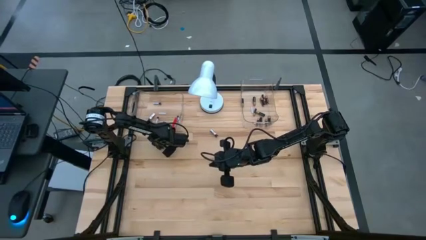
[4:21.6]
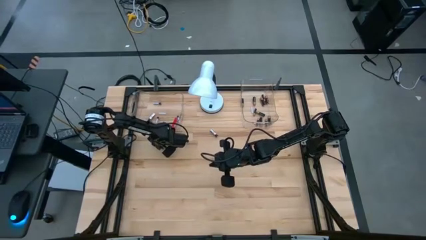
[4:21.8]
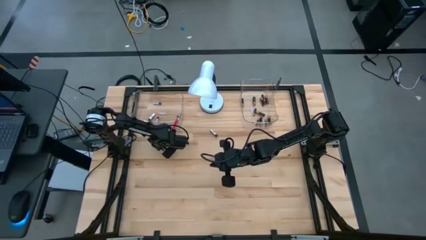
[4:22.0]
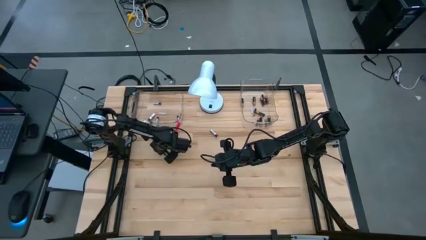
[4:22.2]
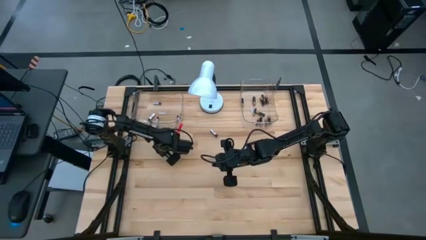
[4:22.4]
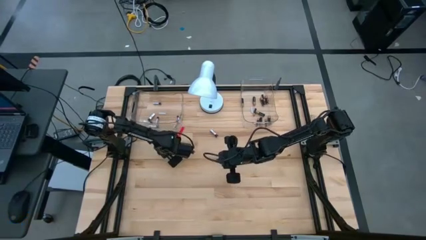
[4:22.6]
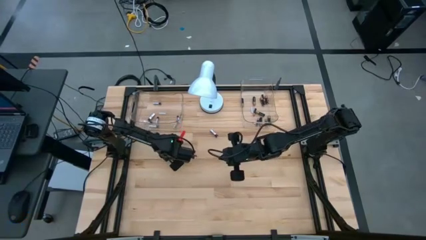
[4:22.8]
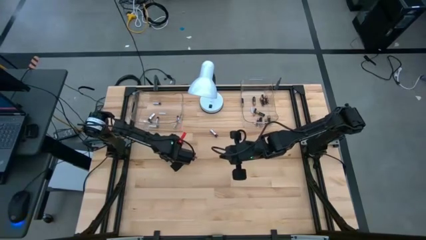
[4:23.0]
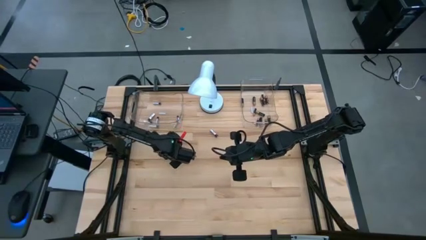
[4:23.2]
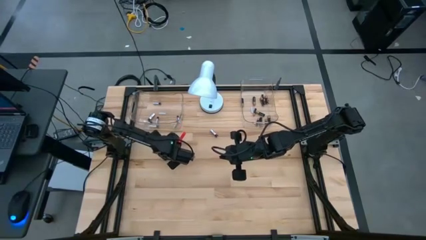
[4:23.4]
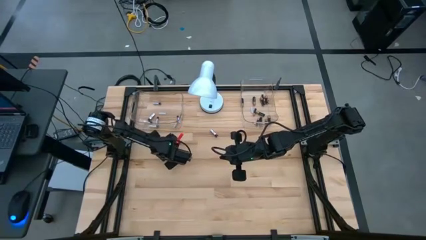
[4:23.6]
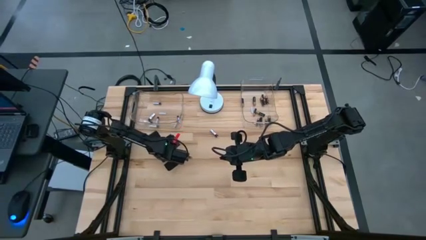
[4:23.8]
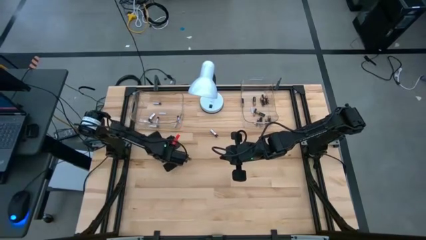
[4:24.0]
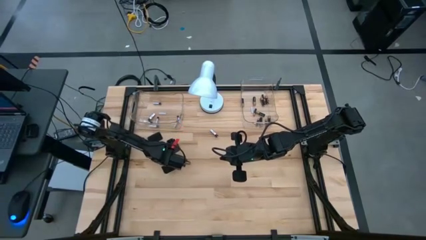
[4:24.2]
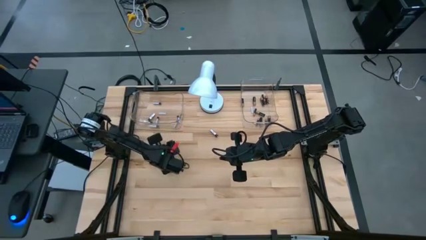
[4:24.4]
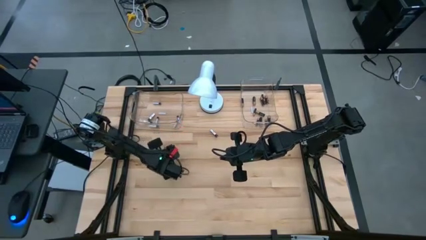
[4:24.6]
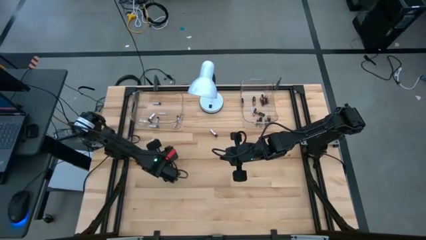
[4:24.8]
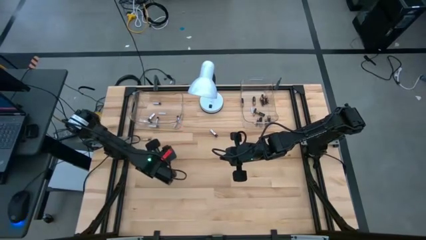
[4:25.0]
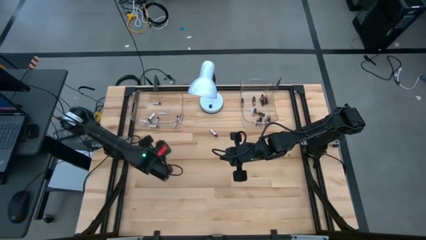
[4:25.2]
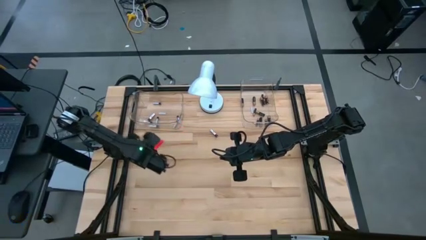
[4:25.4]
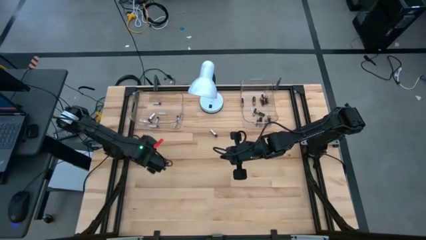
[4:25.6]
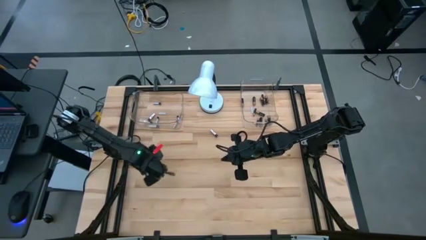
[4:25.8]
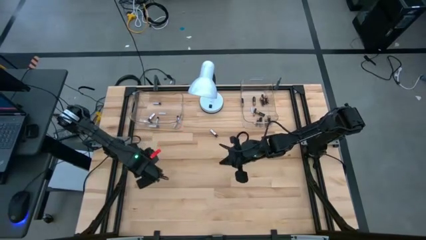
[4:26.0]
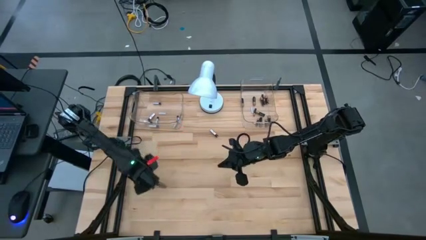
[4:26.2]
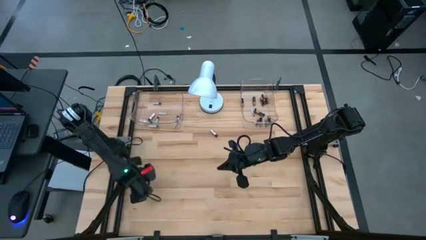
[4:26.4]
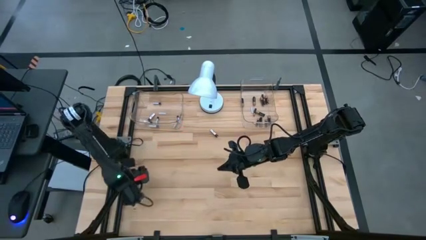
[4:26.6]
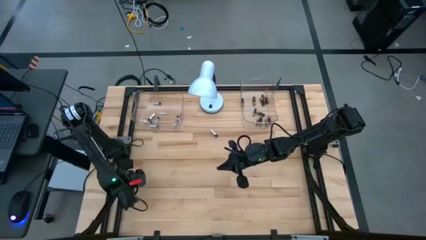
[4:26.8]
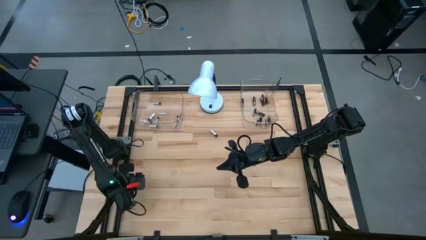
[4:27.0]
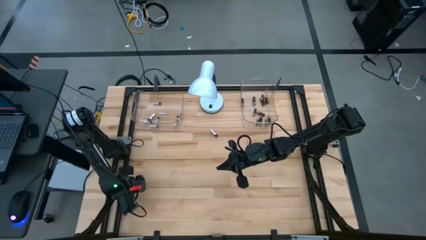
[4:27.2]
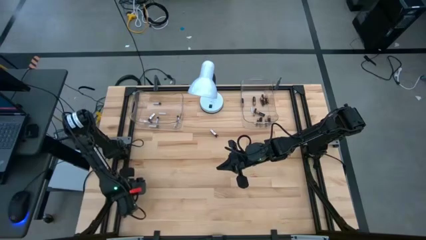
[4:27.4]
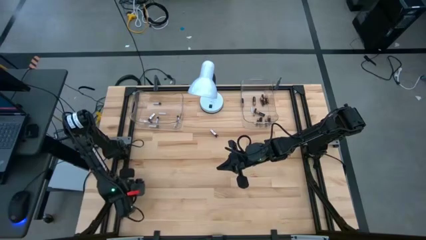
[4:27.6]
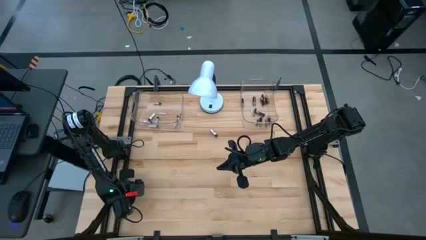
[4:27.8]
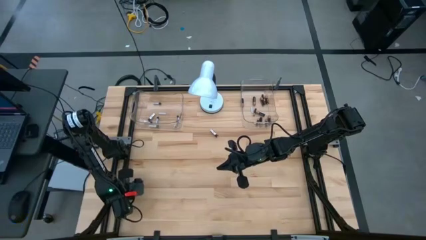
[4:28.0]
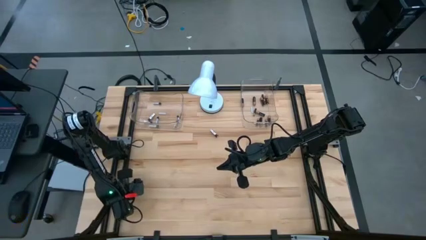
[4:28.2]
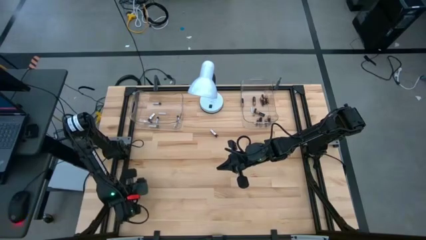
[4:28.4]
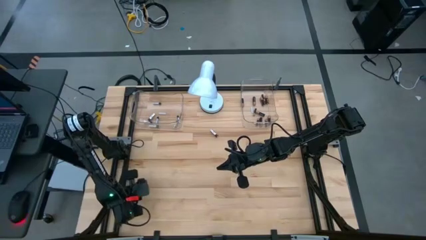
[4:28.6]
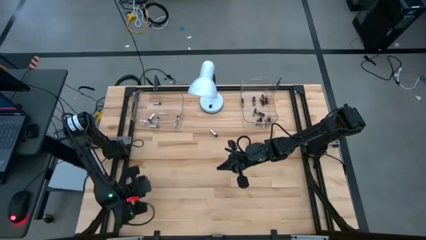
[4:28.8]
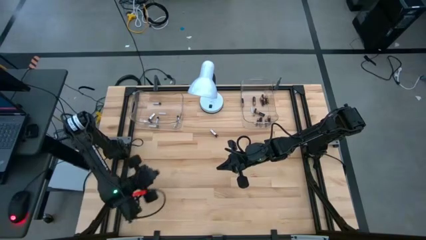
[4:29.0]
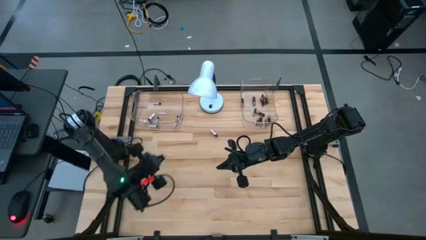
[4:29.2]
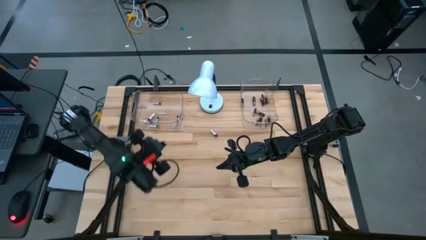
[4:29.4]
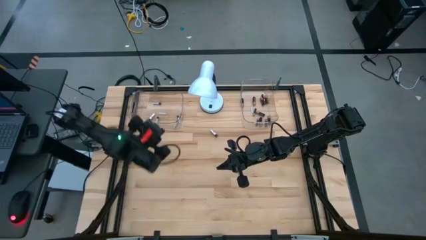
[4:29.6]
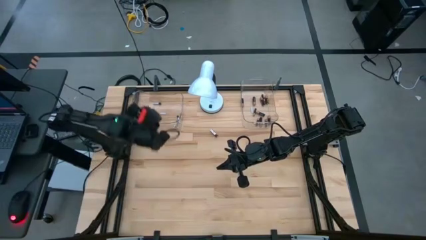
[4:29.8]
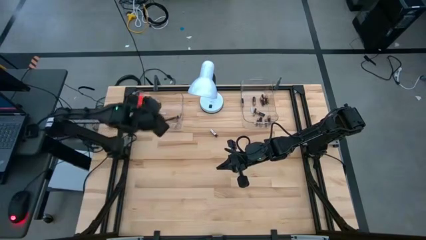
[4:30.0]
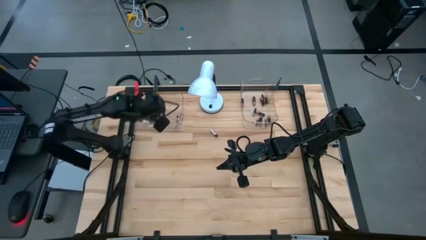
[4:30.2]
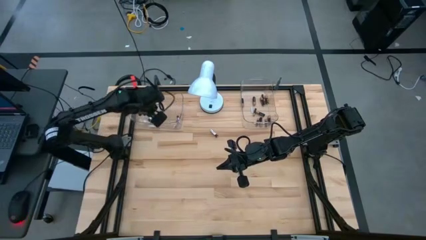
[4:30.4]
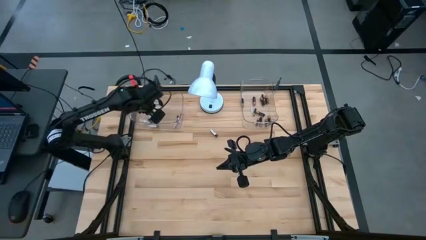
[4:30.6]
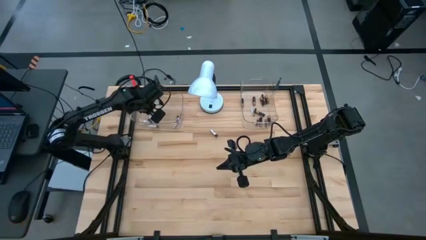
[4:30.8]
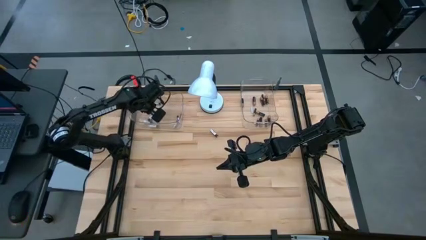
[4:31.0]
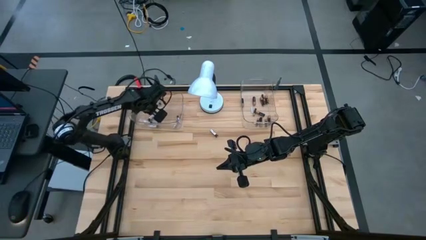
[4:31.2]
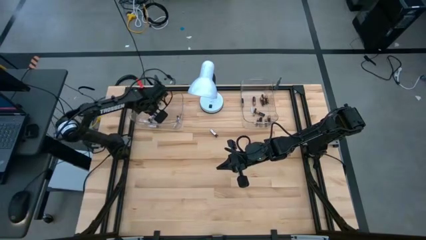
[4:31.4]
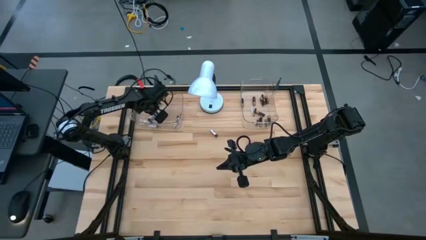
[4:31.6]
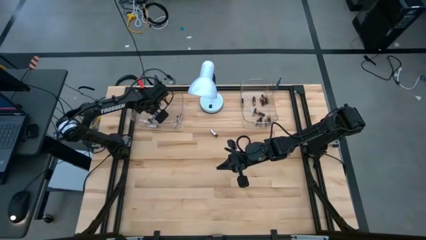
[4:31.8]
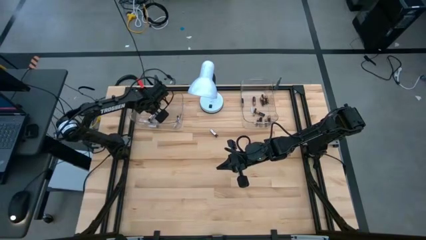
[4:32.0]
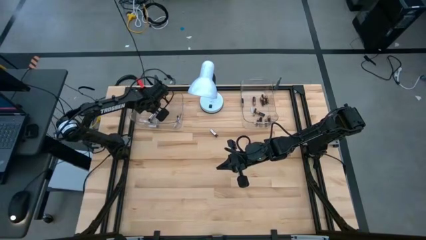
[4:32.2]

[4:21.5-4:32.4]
Task: Sort batteries
Put the silver battery in the transparent bin

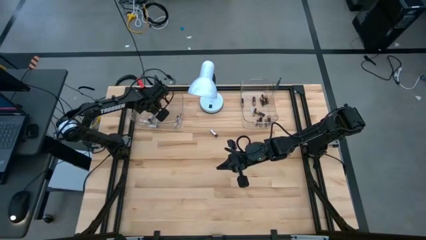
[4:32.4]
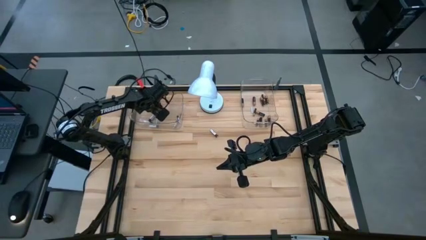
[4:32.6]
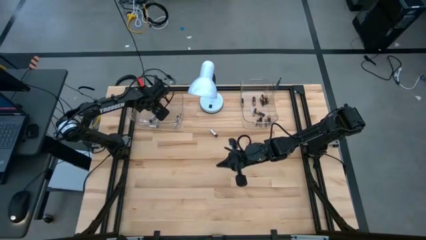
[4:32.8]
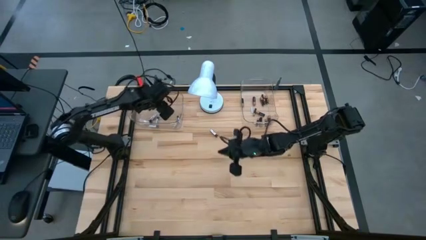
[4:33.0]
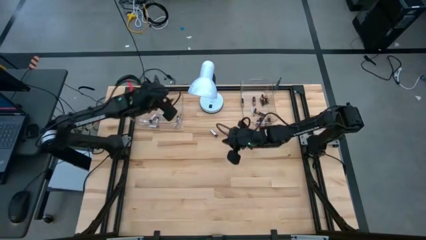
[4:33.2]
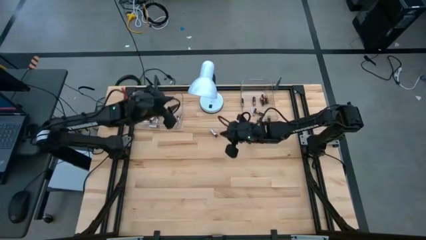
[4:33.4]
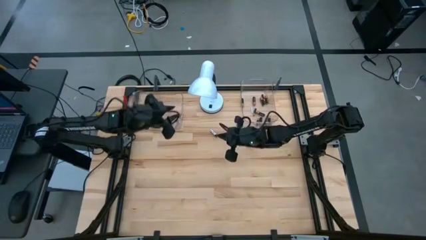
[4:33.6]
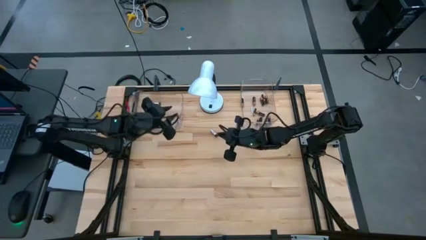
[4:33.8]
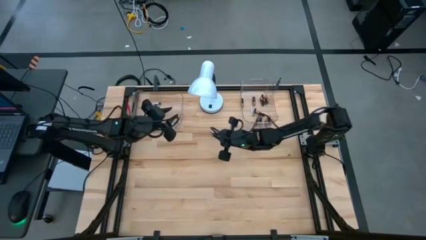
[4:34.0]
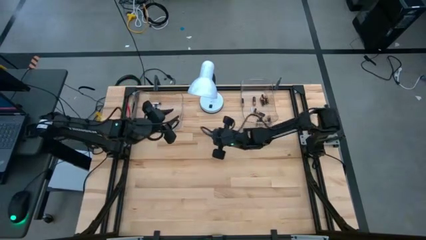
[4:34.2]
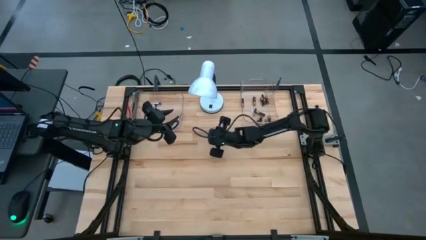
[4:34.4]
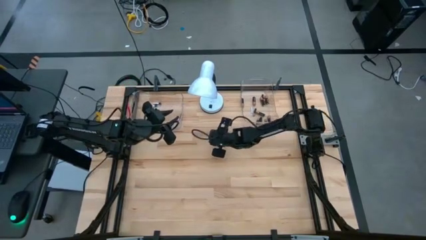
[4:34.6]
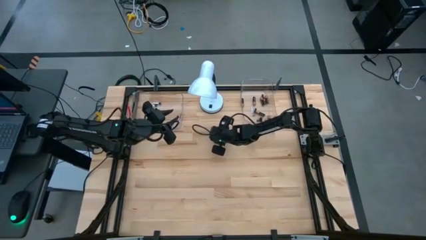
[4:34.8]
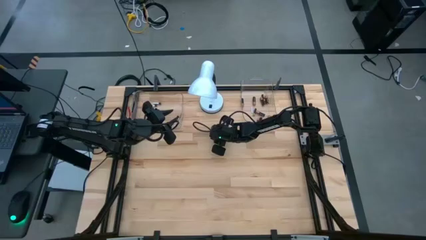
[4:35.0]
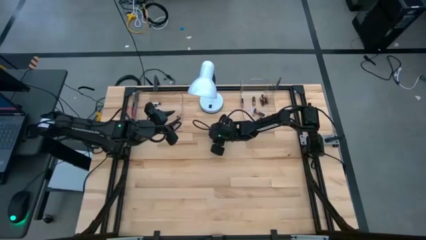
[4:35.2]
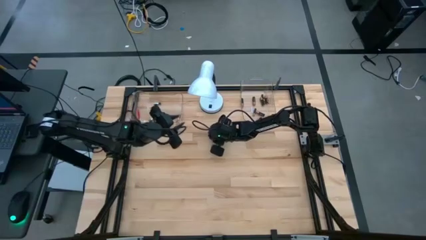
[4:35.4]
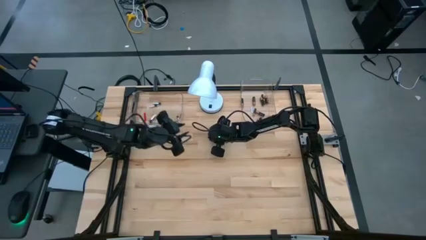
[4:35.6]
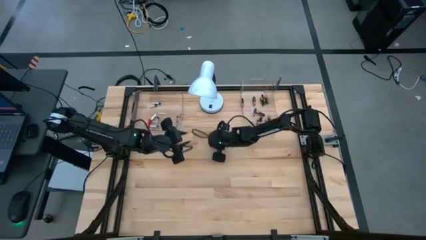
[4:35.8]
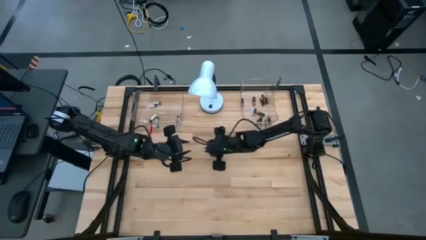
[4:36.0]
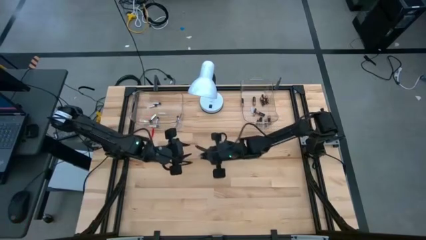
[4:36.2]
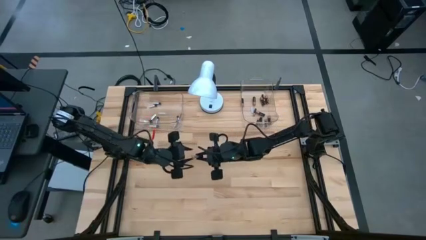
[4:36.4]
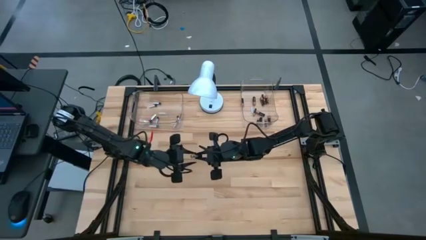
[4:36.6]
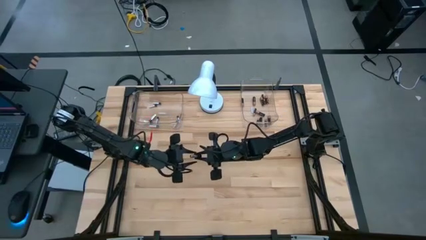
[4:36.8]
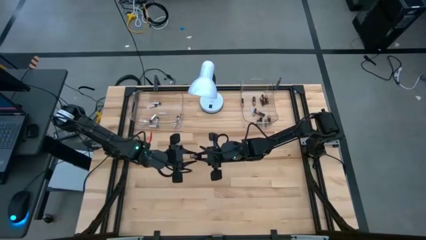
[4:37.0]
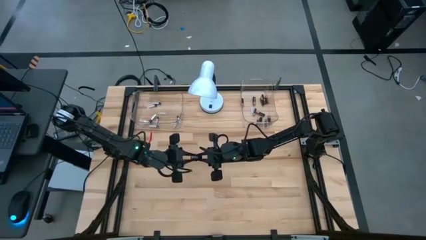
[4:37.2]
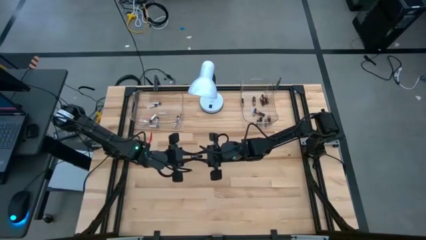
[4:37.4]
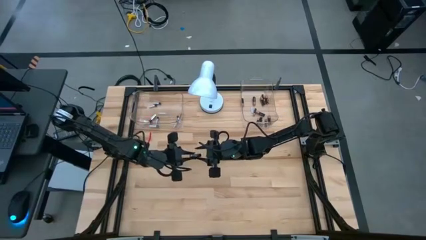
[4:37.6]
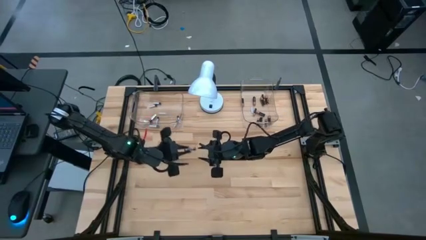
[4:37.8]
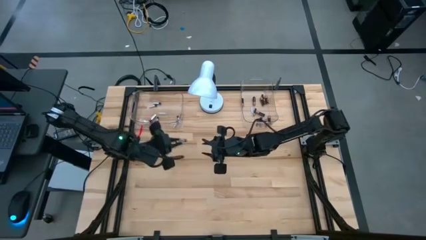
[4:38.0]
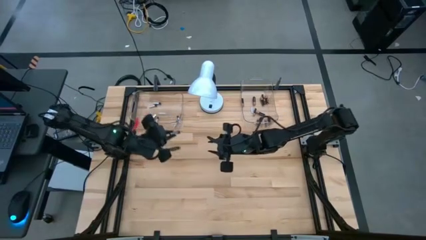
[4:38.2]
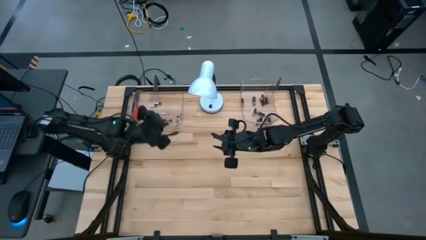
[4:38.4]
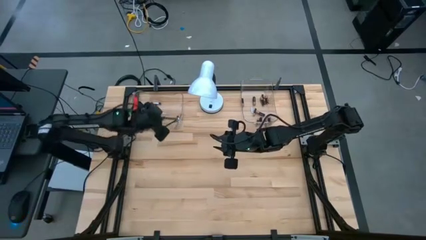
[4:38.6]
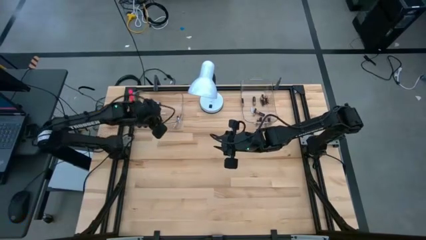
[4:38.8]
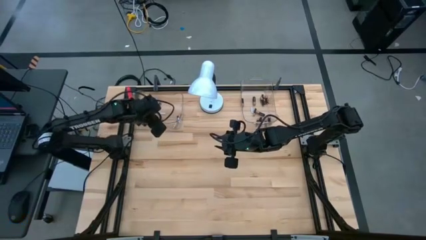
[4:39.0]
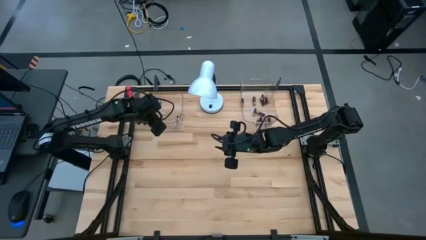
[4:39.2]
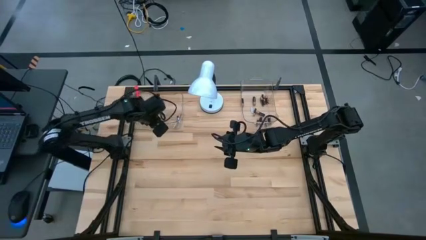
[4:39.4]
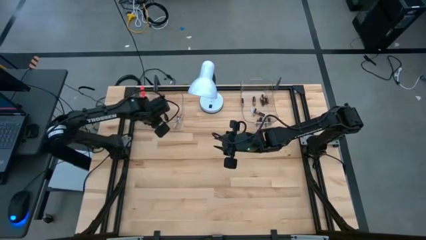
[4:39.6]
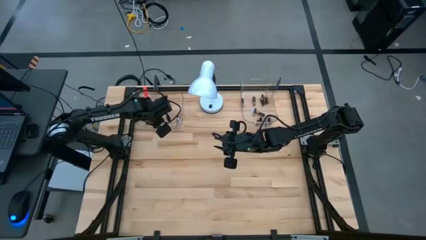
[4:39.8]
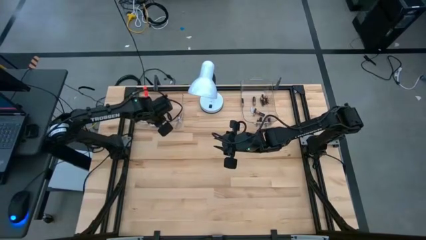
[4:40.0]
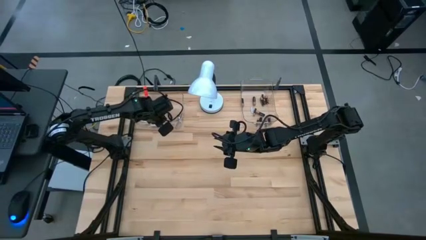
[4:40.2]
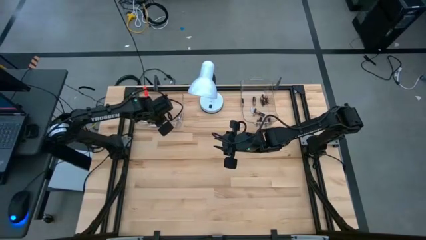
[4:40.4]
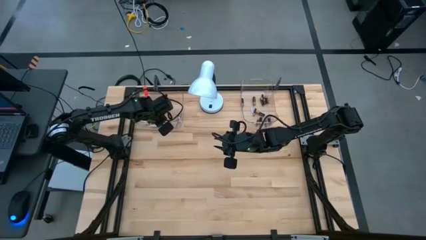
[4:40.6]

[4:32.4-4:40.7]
Put the silver battery in the transparent bin
